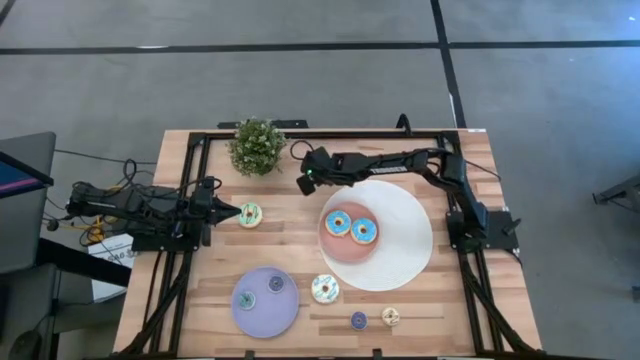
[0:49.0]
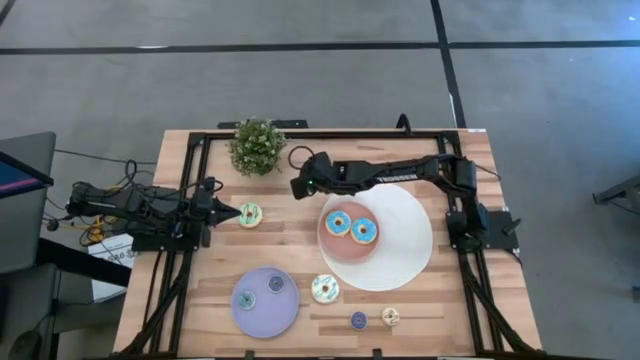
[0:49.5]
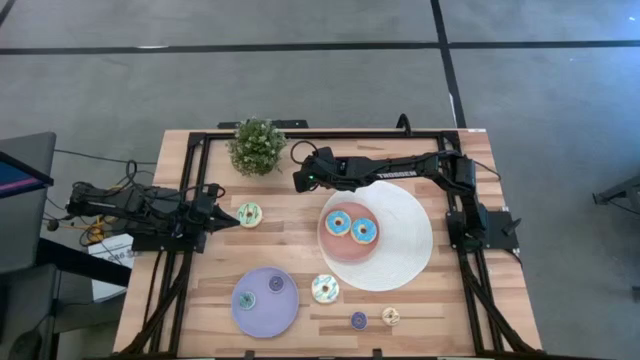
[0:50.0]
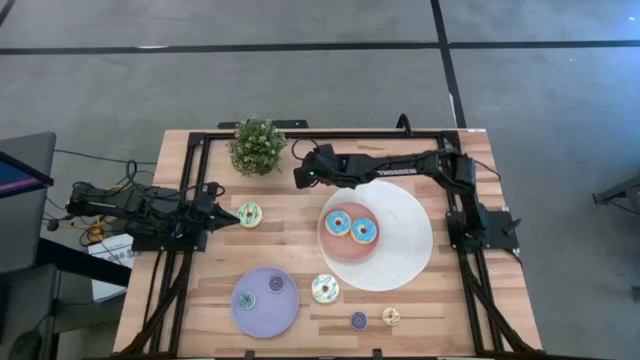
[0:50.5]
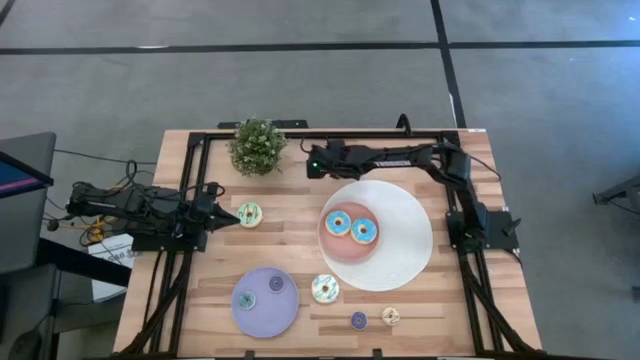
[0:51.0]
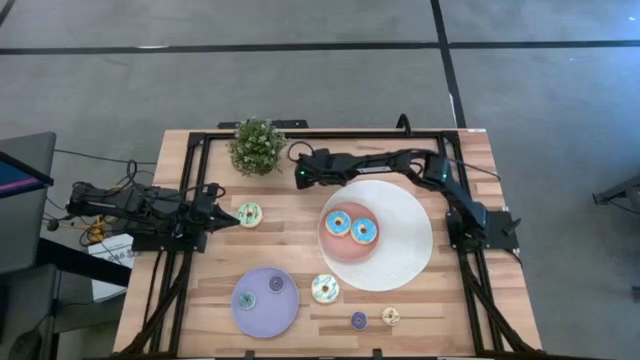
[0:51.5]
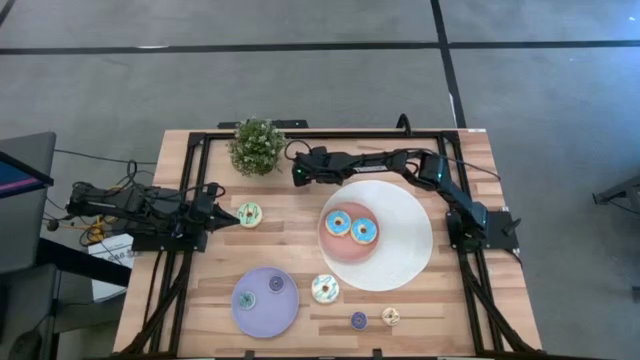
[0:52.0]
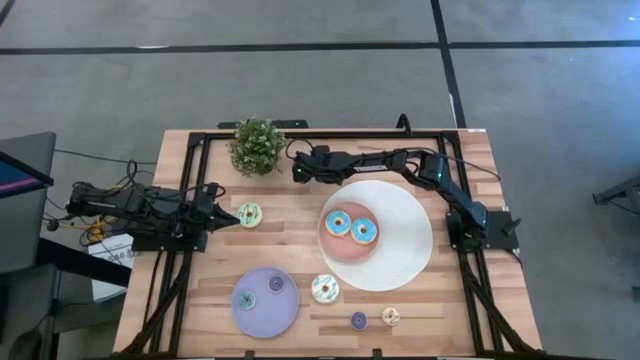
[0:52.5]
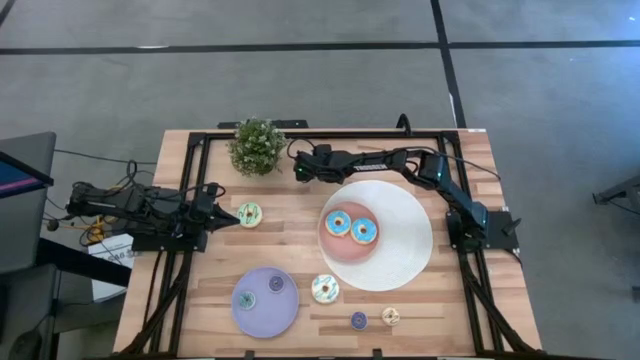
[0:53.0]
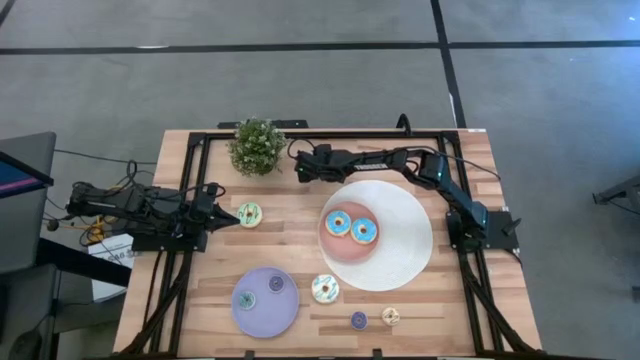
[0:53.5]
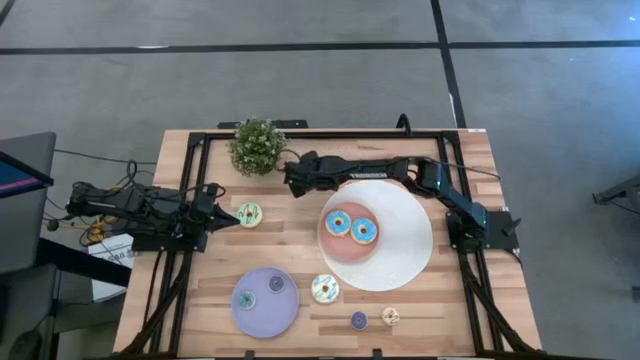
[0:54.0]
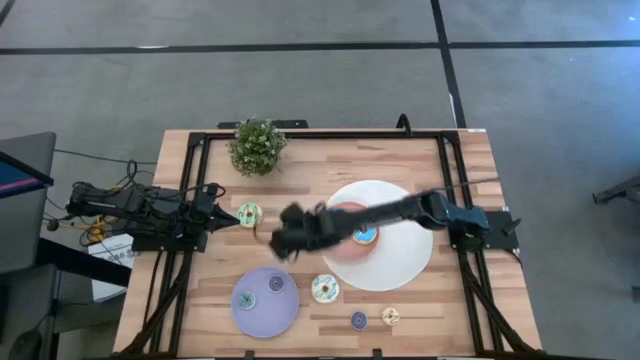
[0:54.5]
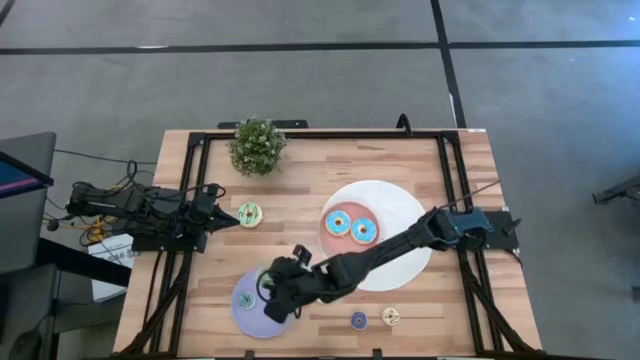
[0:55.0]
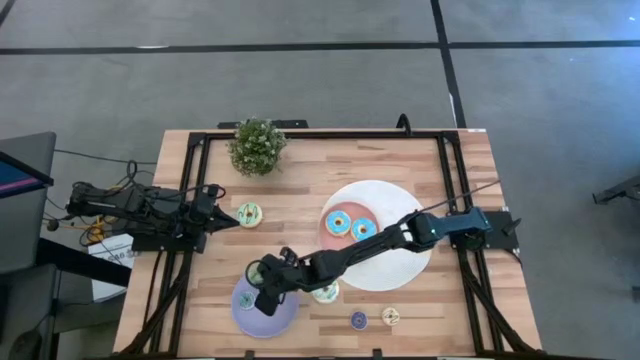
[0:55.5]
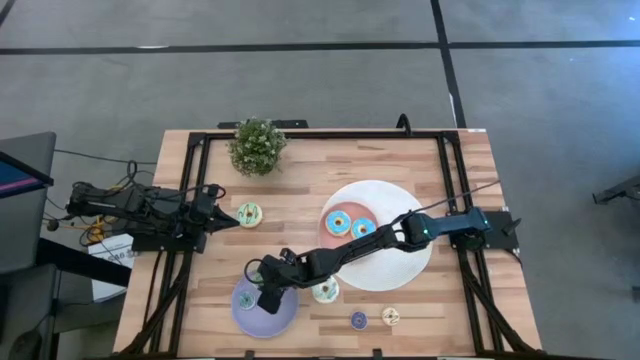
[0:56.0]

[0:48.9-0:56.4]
Task: Pick & Place donuts
Put the small green donut on the purple plate

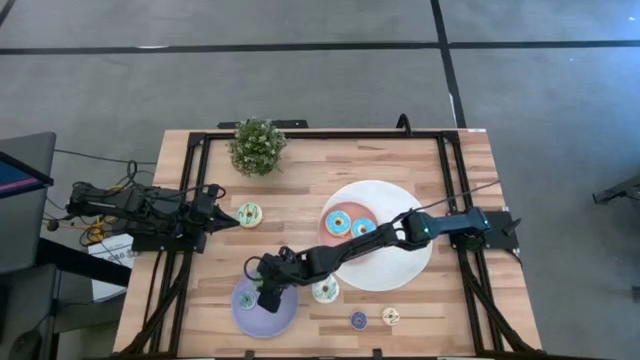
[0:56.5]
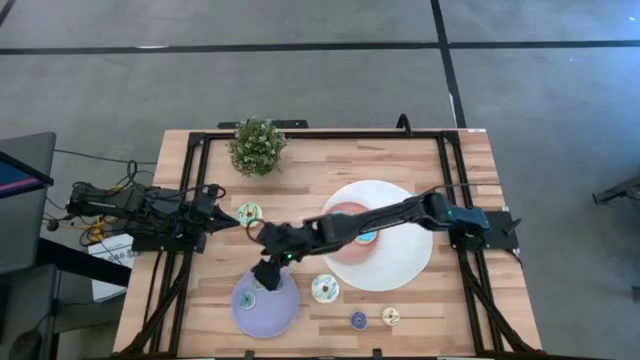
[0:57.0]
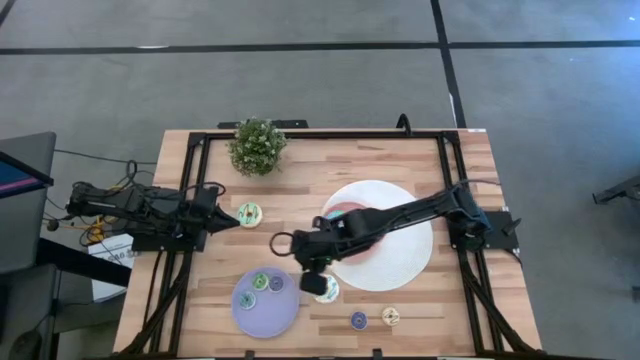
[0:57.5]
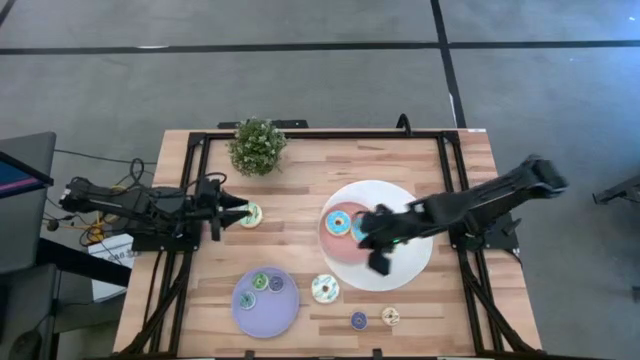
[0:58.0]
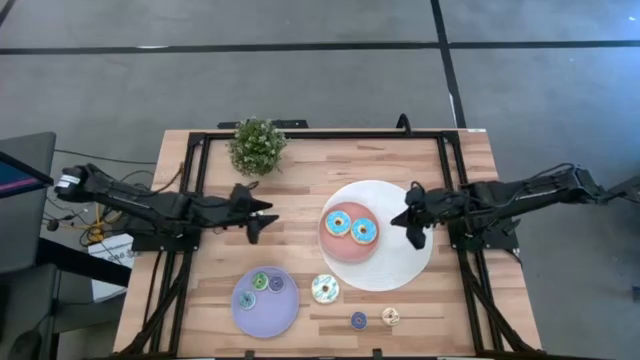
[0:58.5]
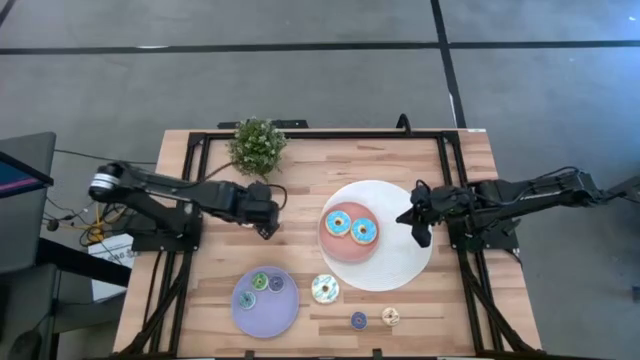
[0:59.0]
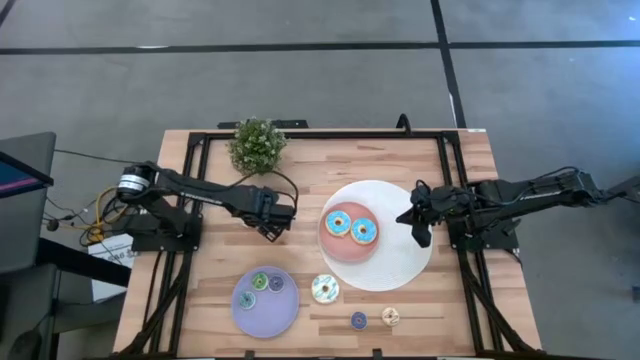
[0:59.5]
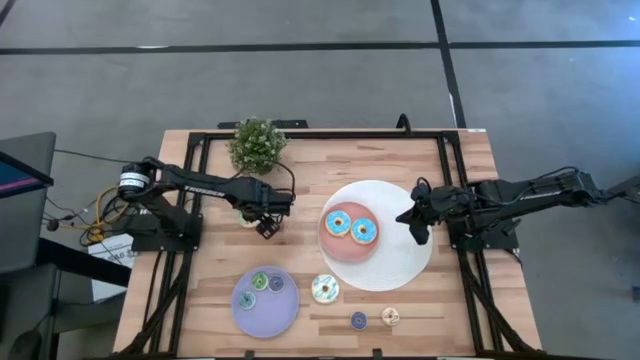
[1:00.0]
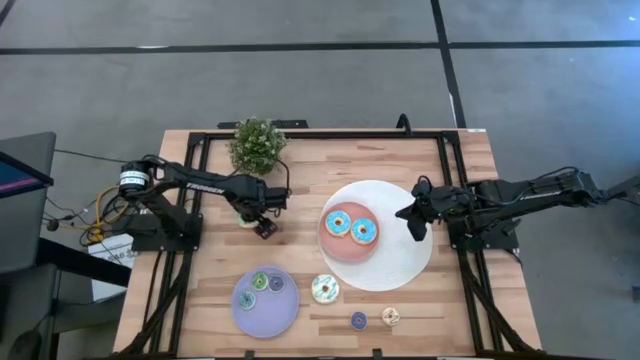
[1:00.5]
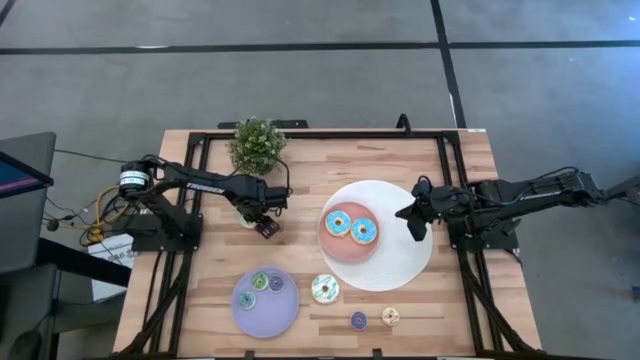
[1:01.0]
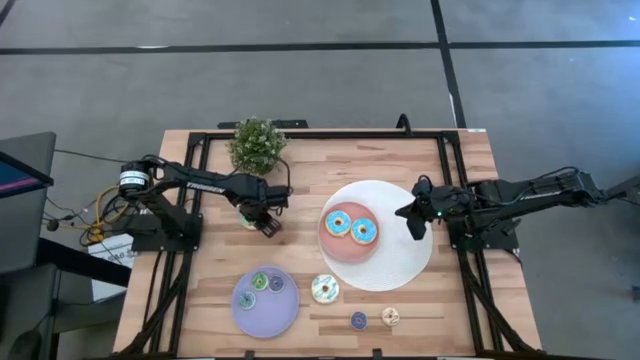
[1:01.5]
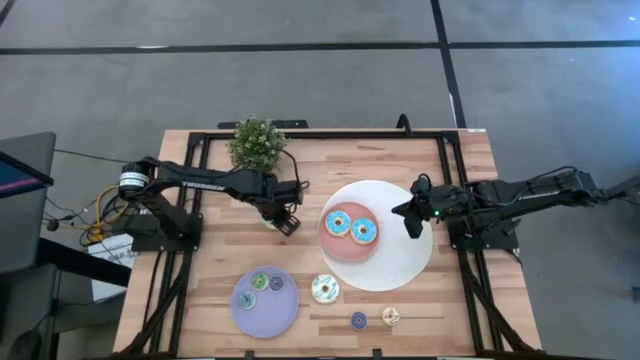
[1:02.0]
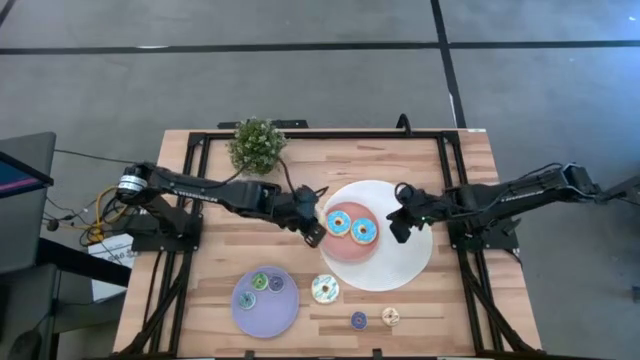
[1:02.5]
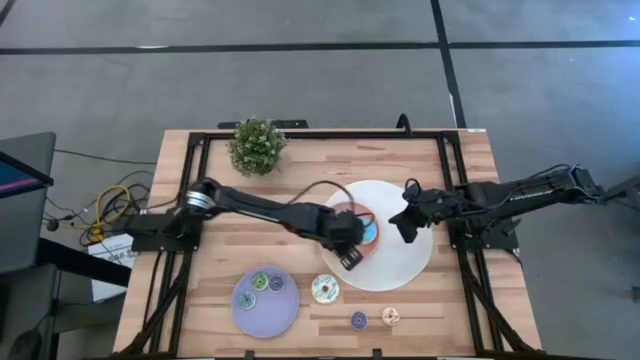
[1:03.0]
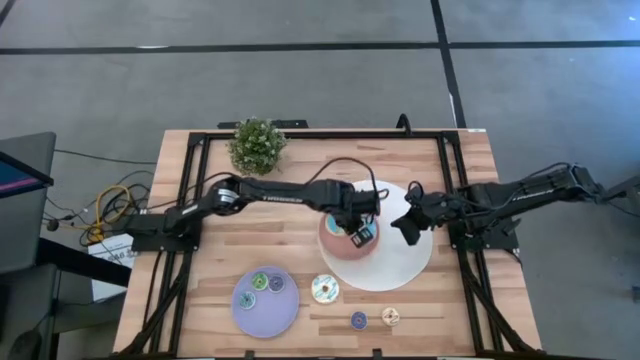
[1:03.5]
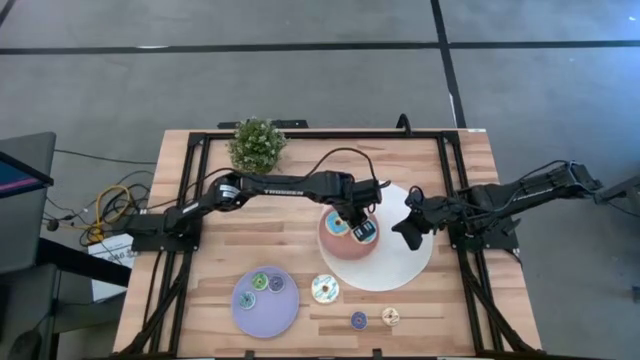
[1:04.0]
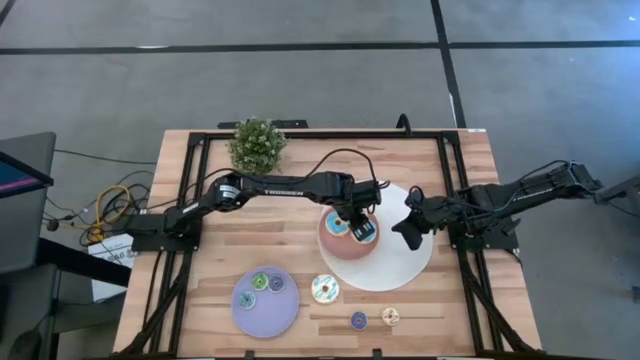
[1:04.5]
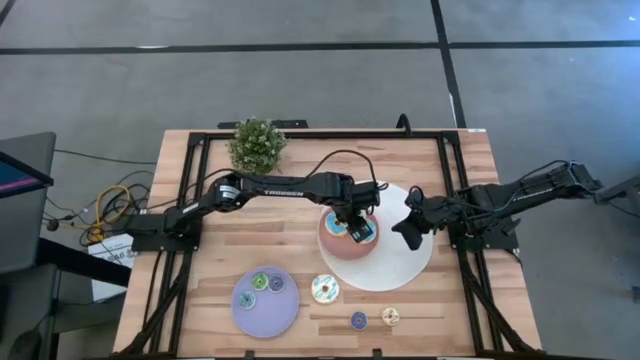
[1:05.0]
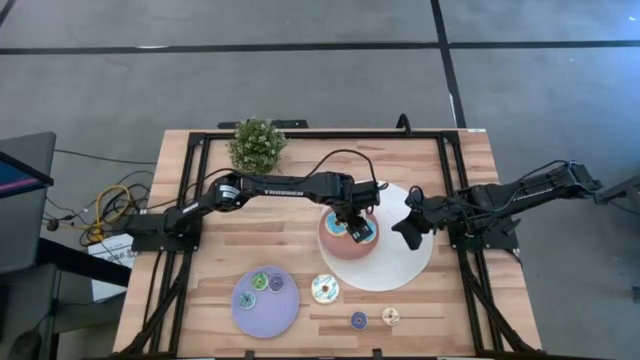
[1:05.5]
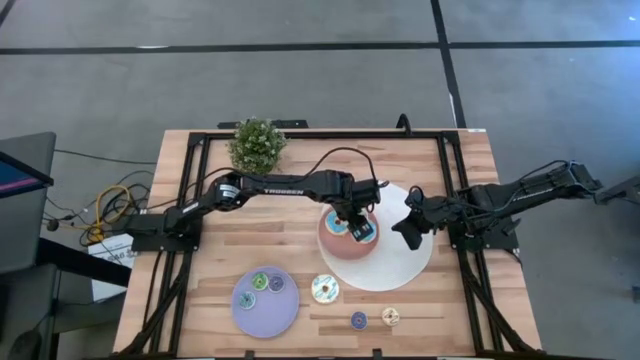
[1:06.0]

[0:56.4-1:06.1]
Put the large light green donut on the light pink plate

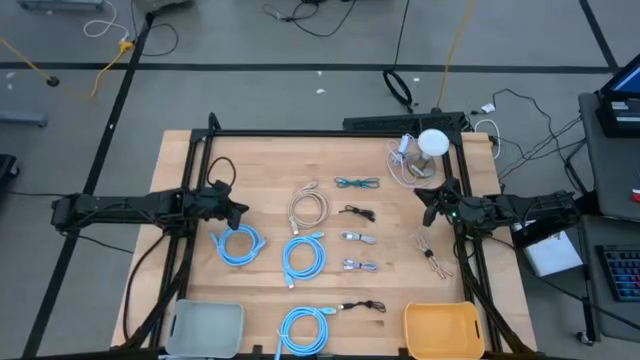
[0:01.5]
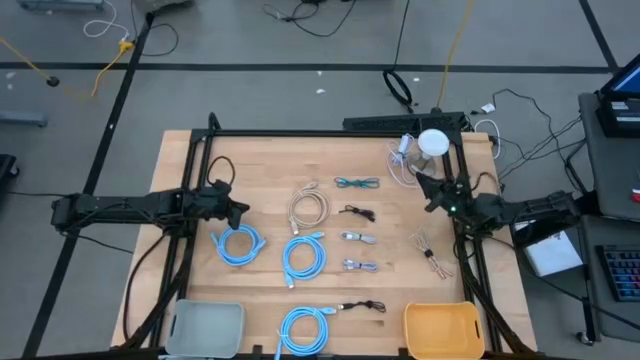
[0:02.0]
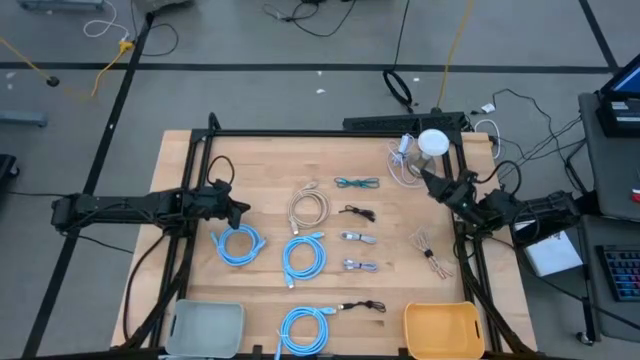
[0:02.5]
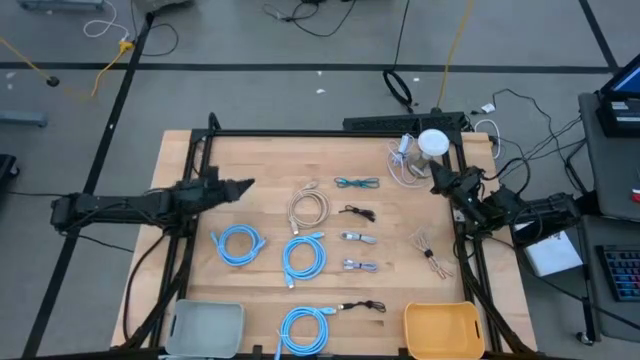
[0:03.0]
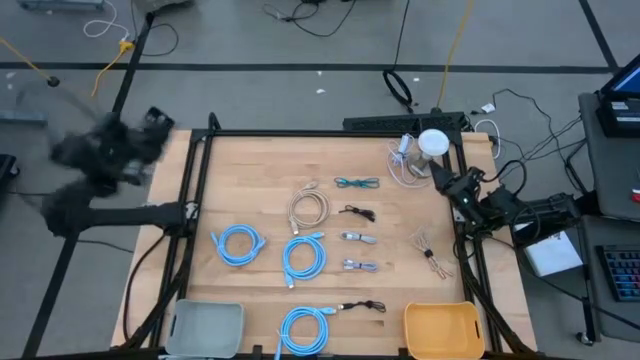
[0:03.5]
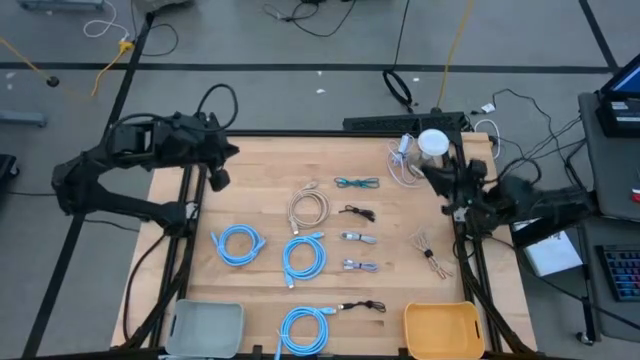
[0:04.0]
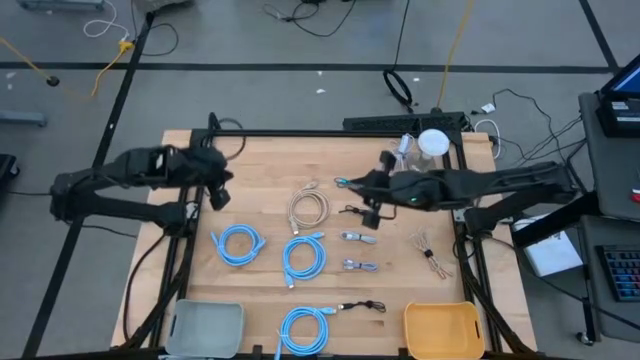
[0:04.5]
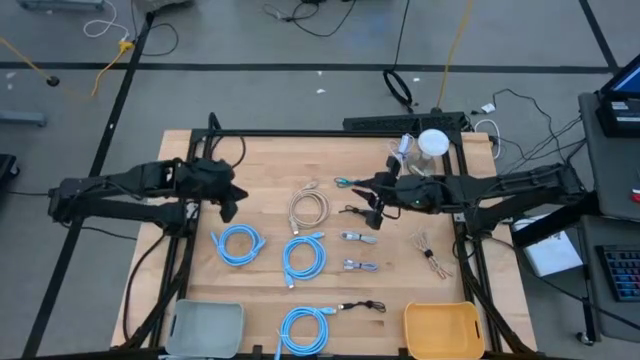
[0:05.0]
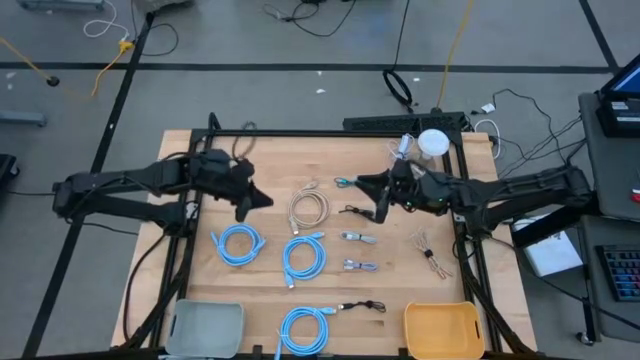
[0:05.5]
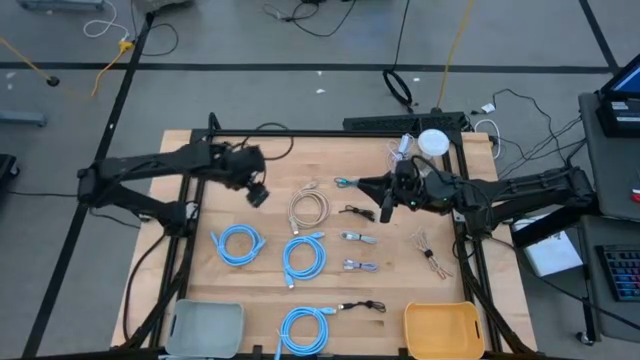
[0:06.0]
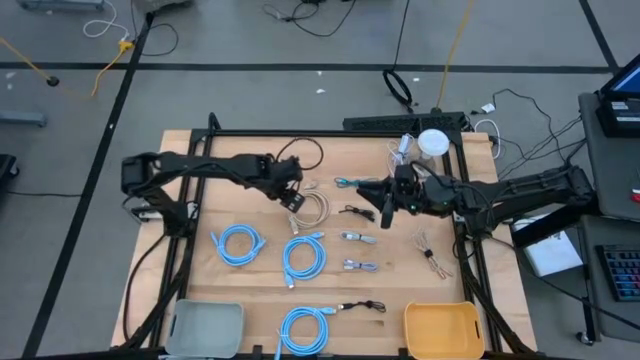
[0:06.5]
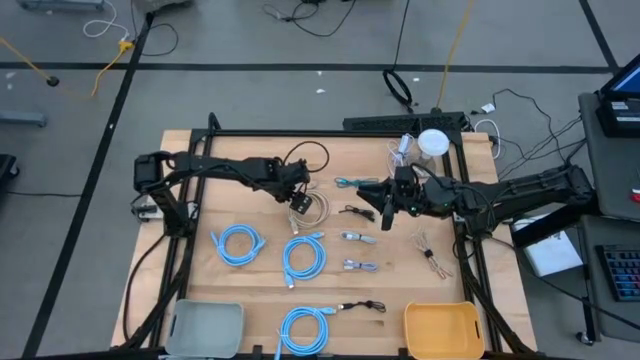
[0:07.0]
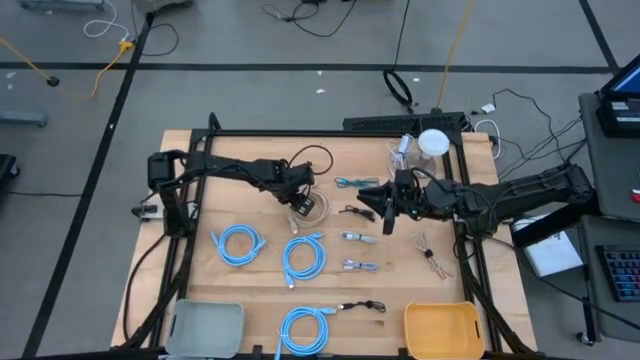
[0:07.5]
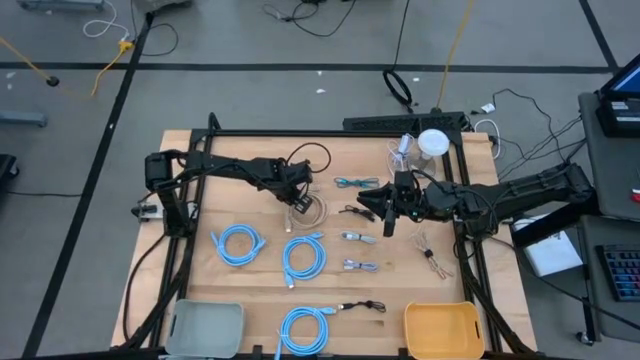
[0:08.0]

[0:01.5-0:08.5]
Task: Pick & Place USB Port
Put the brown HDMI cable into the gray bin
